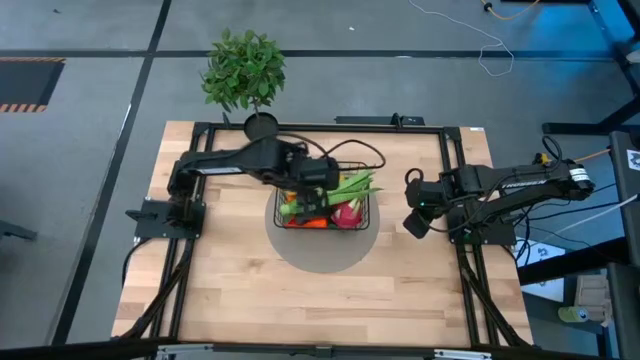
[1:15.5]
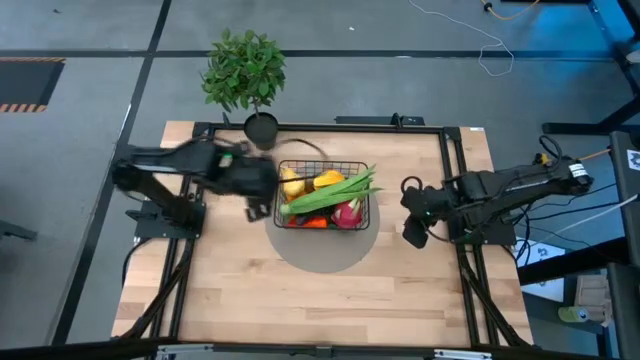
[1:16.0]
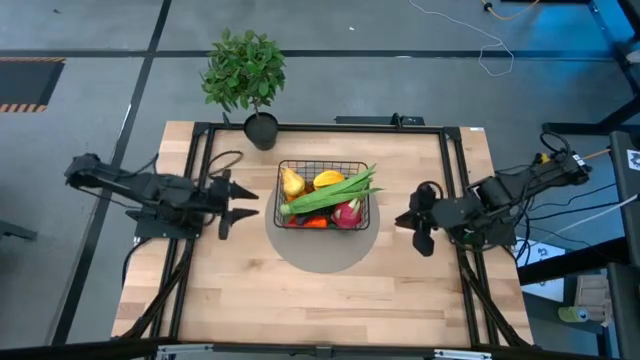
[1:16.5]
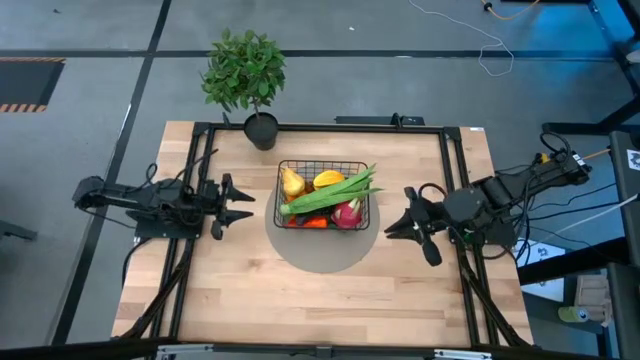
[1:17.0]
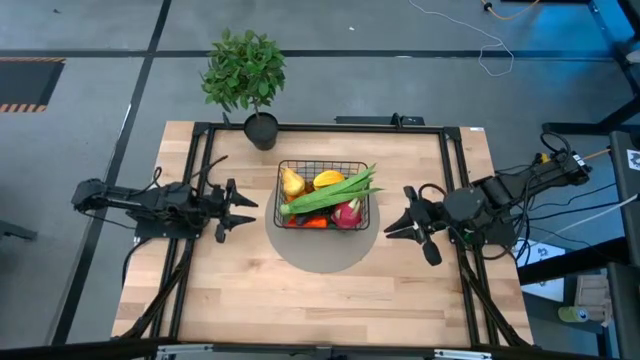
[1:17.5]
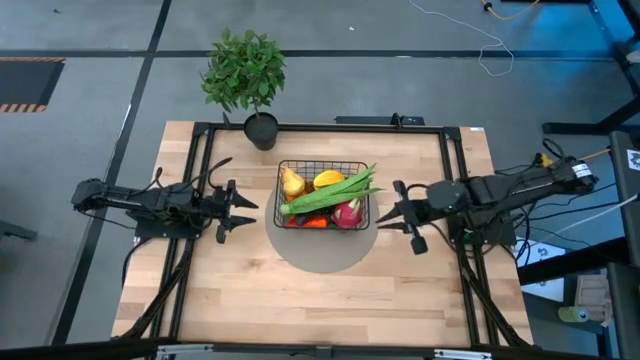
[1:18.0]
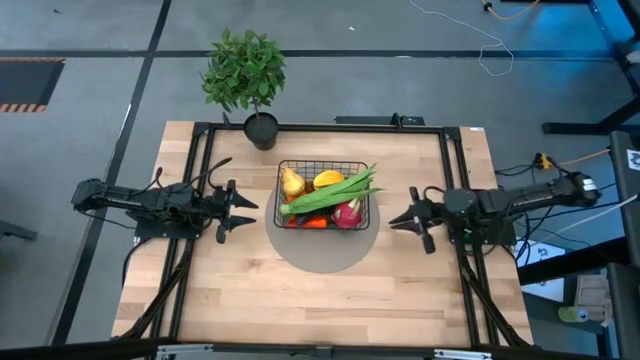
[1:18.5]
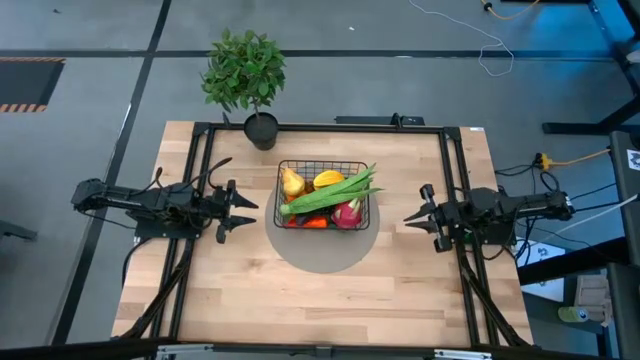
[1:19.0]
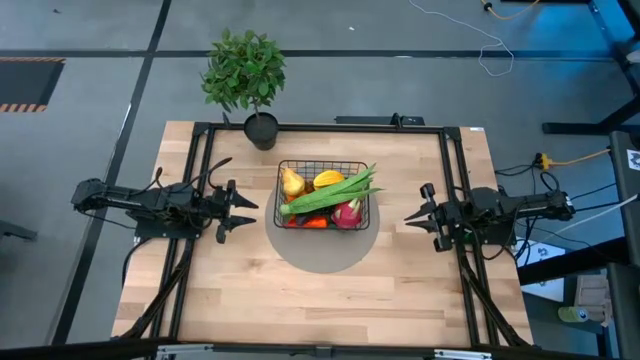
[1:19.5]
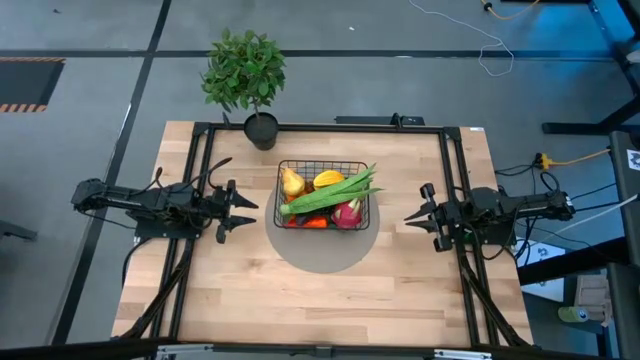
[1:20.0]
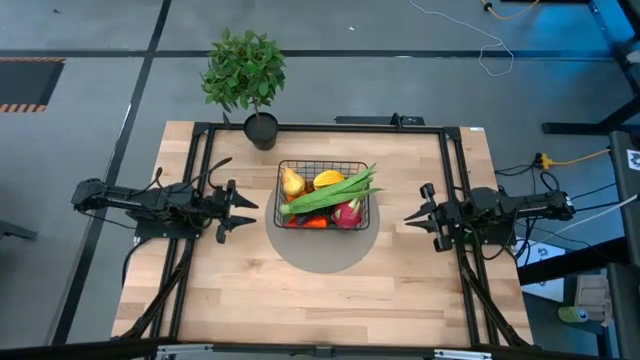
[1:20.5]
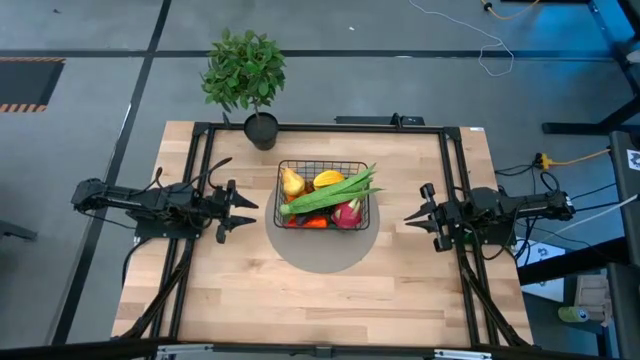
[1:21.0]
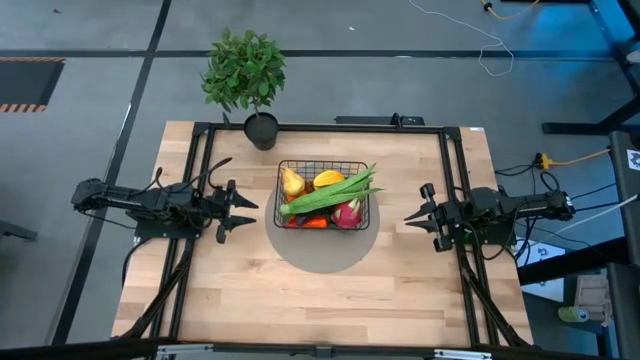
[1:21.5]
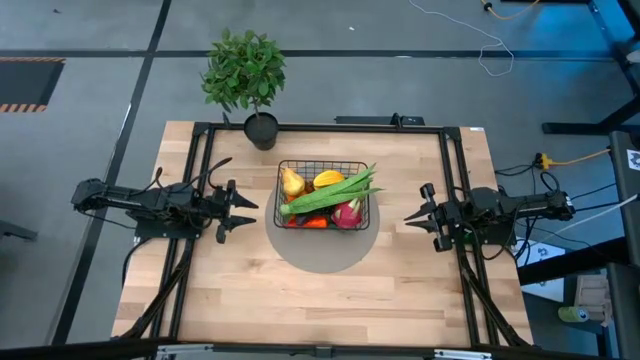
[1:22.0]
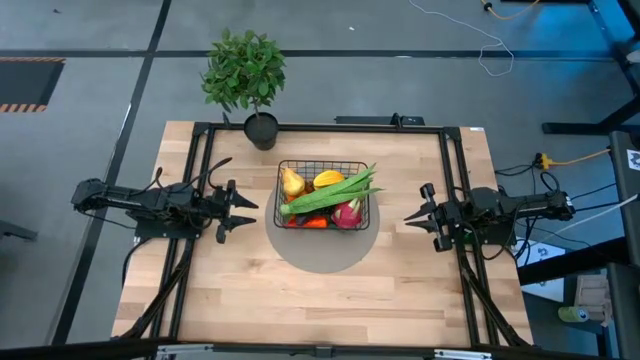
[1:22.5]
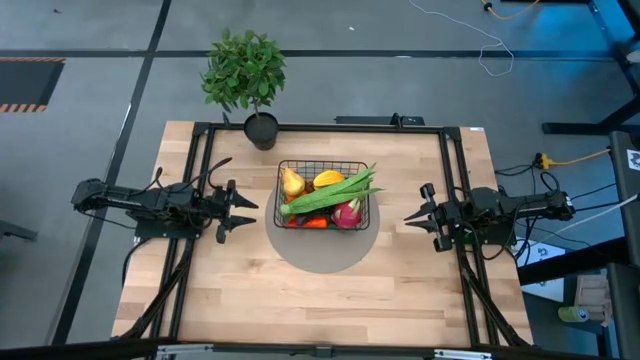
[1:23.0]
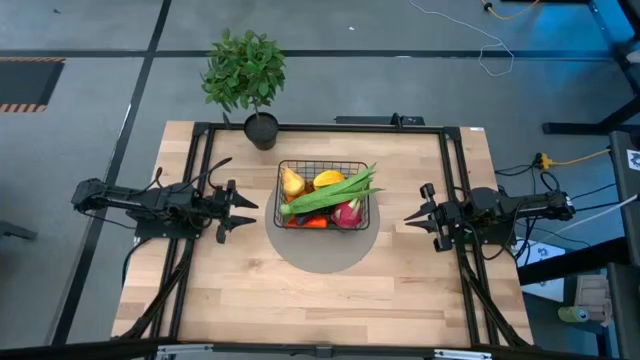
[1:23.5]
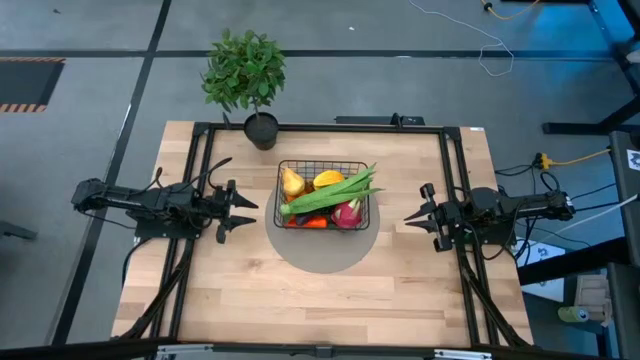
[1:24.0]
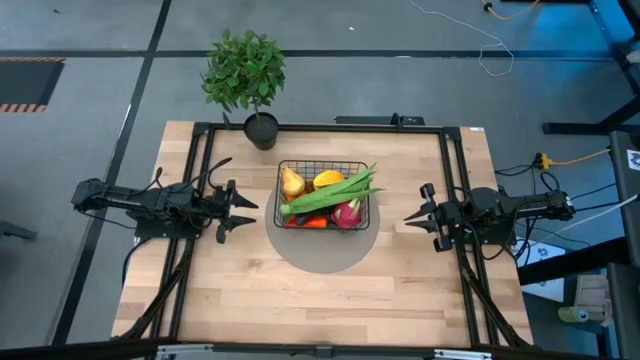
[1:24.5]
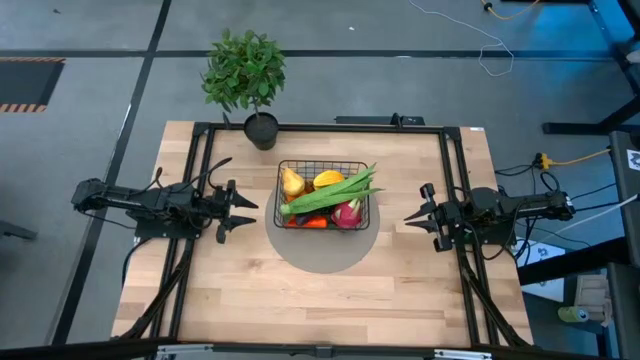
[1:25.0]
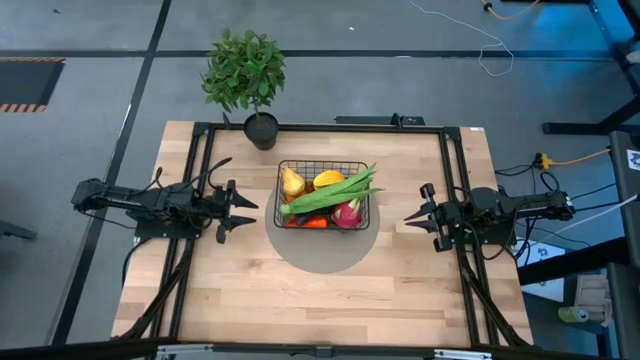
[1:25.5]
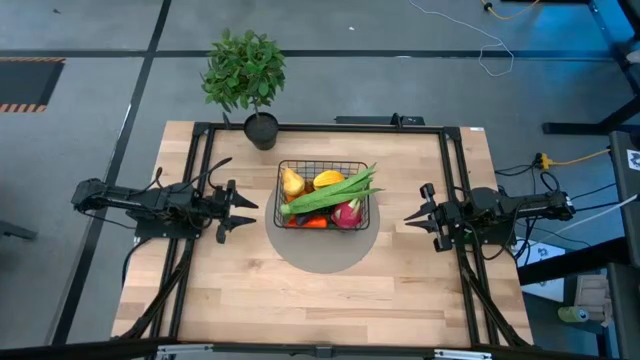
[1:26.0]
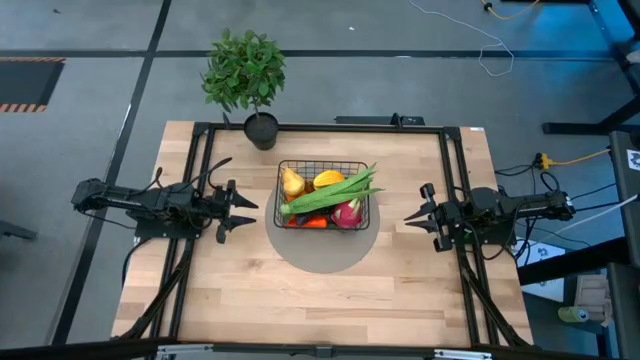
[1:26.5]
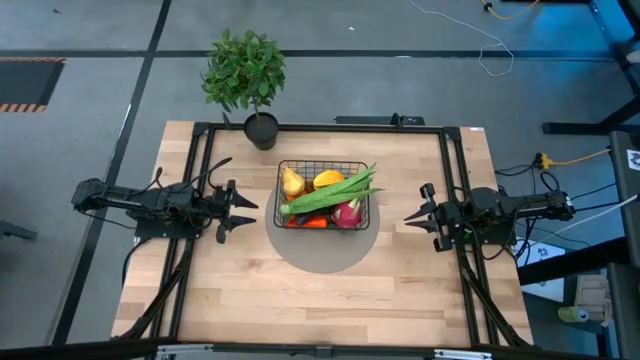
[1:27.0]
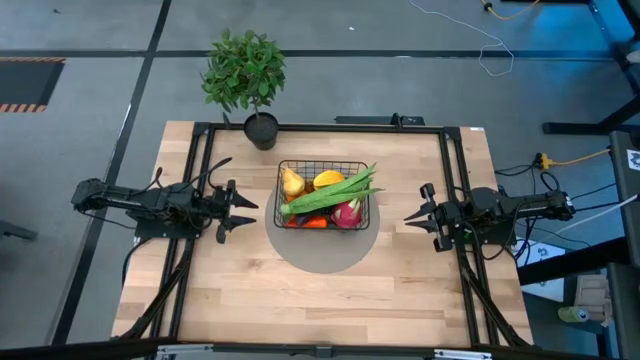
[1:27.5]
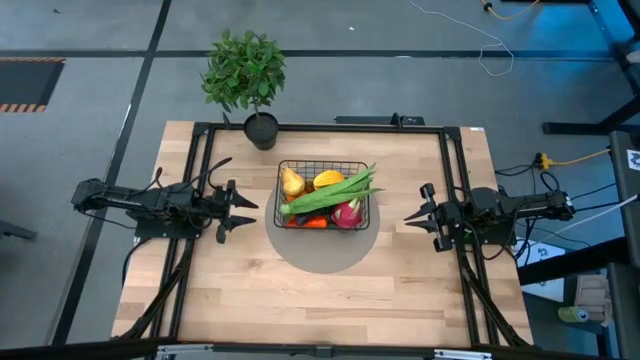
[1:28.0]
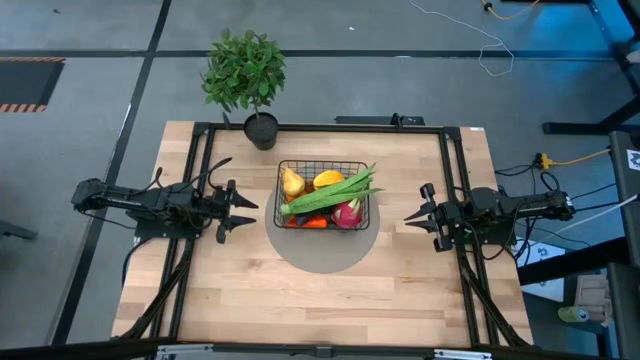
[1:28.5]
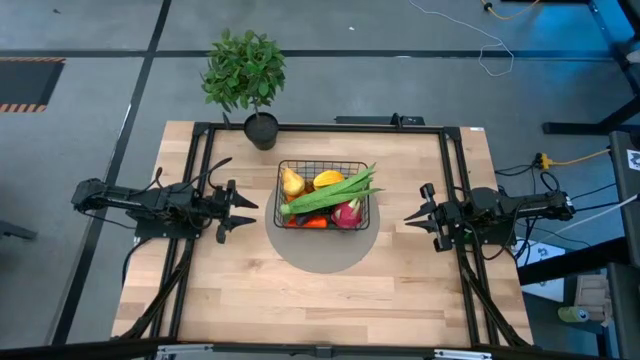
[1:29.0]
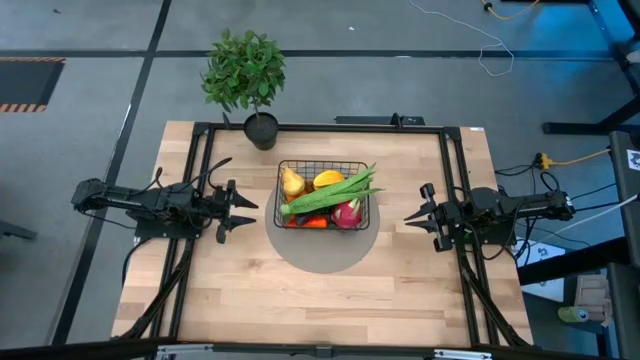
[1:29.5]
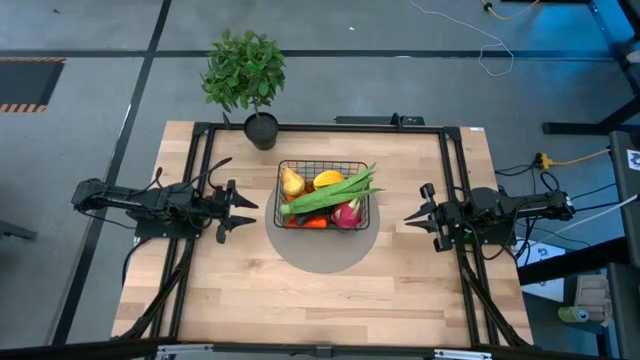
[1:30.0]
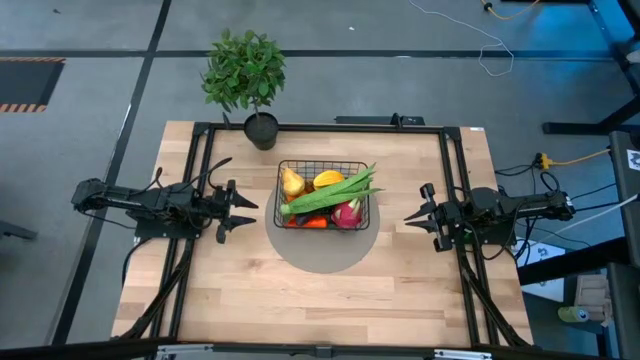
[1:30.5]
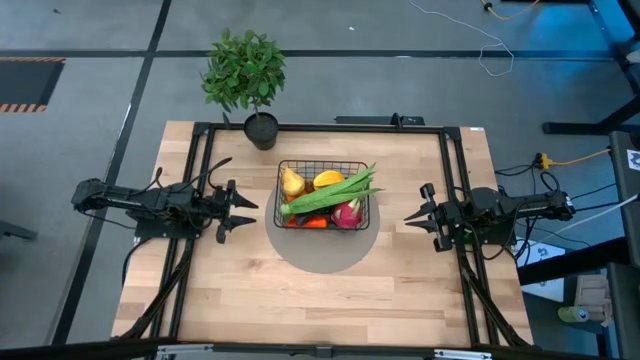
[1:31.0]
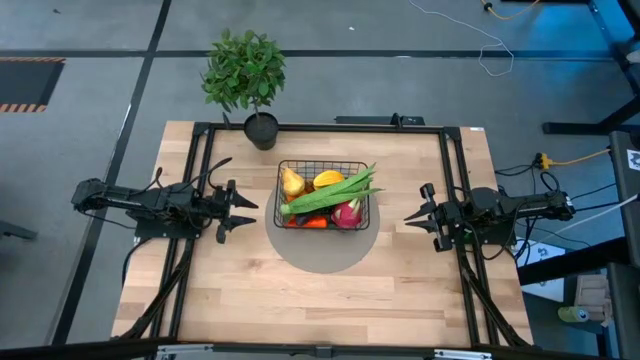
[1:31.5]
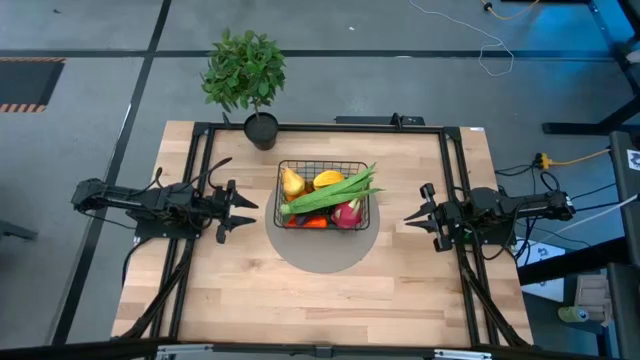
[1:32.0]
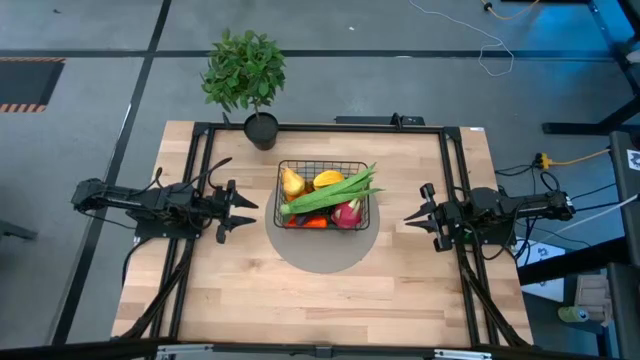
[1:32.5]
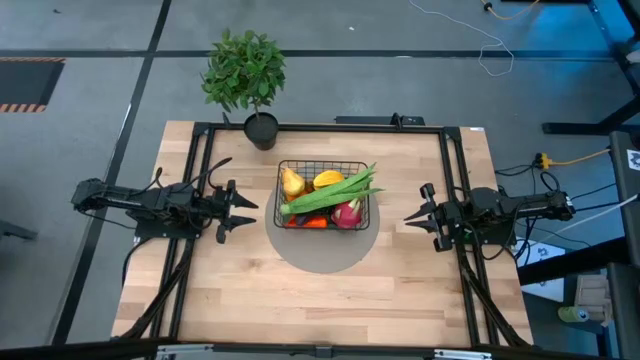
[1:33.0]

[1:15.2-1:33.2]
Task: Build produce basket
Return to Home Position

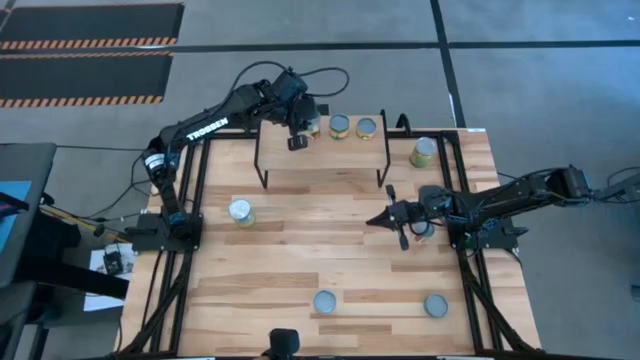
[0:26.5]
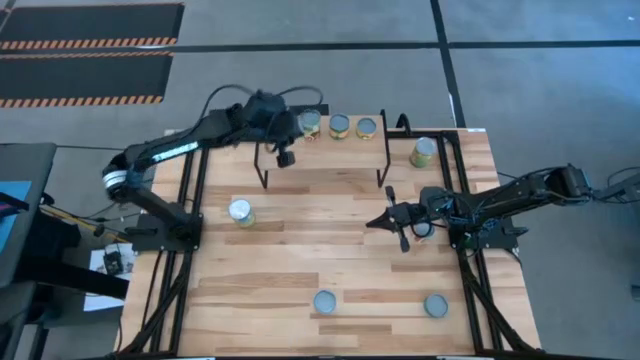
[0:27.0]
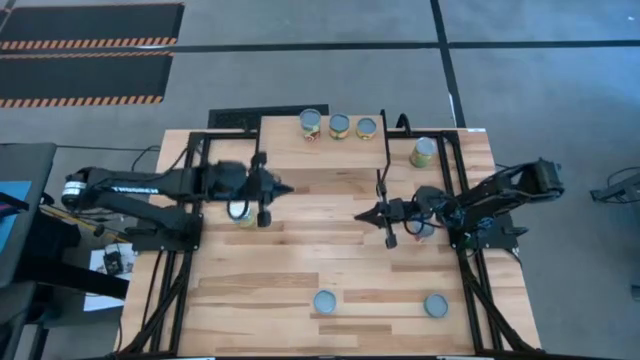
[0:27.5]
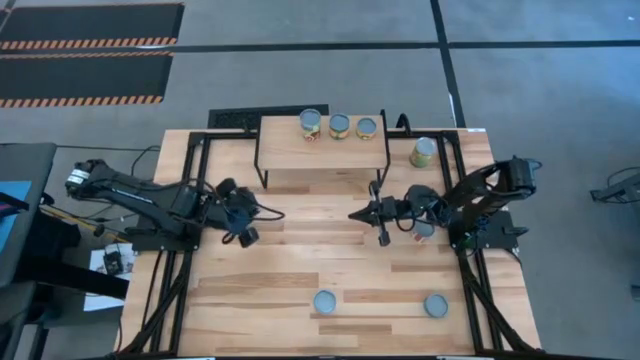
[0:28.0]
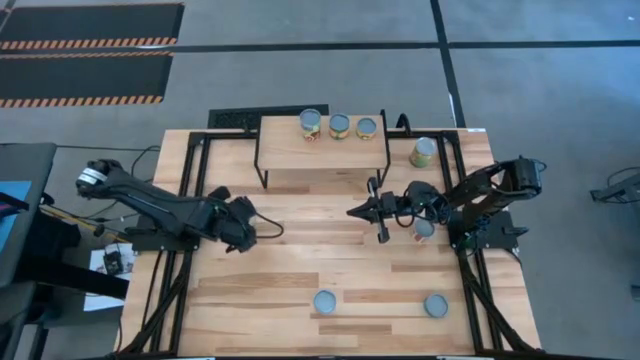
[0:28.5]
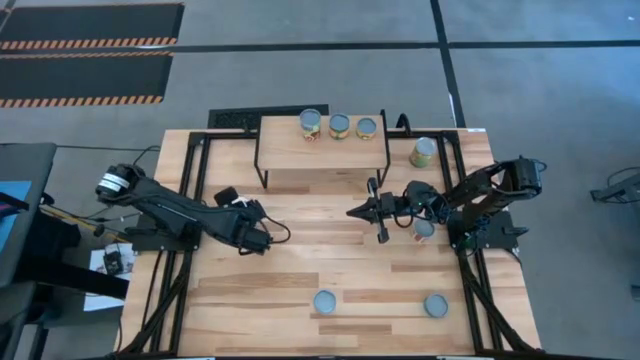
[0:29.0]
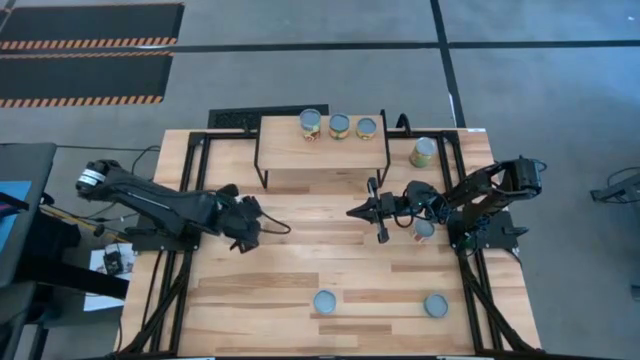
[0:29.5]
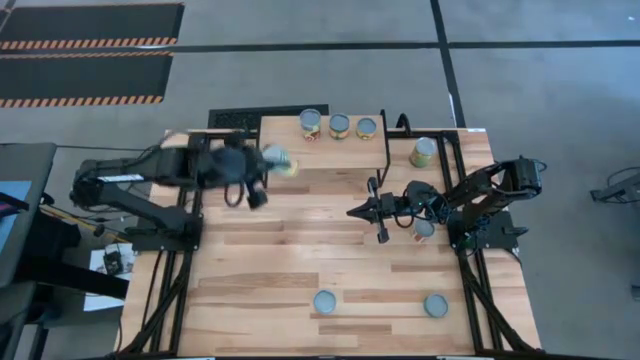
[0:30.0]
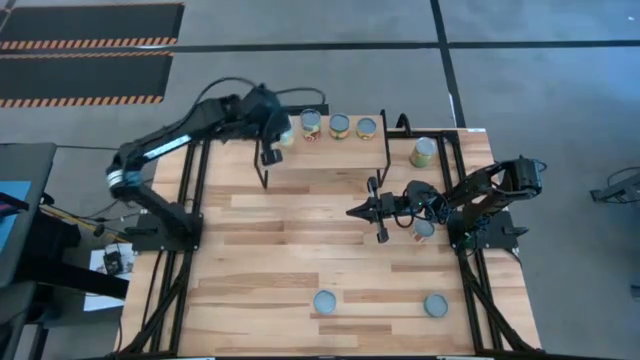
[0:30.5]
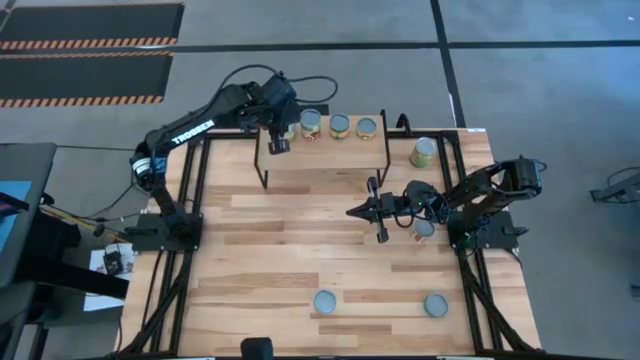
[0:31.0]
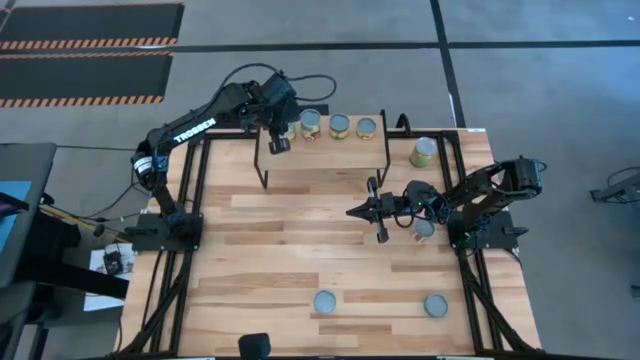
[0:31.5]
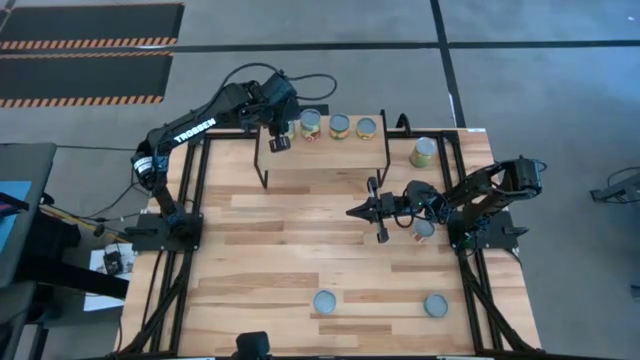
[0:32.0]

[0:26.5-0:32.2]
Task: Pick and place cans onto a shelf
Put the canned carrots on the shelf
